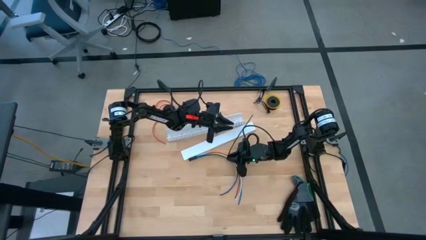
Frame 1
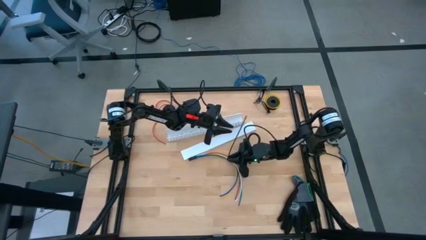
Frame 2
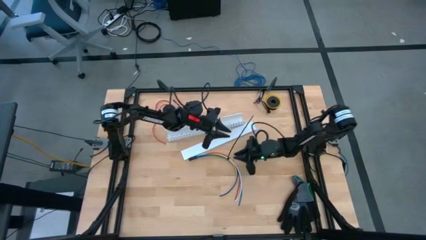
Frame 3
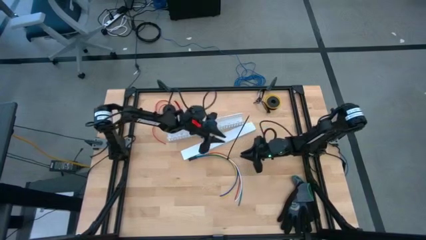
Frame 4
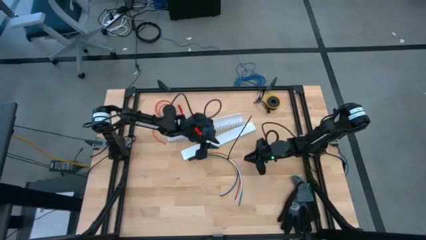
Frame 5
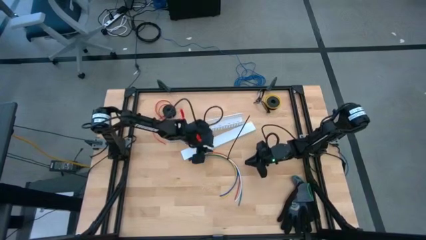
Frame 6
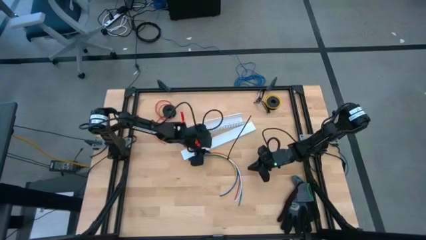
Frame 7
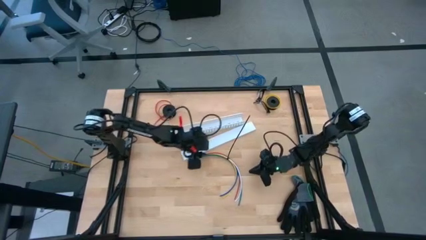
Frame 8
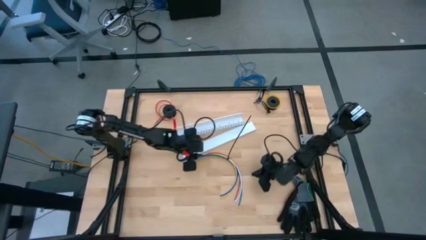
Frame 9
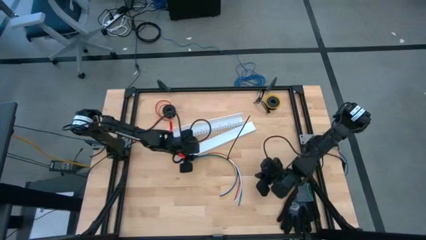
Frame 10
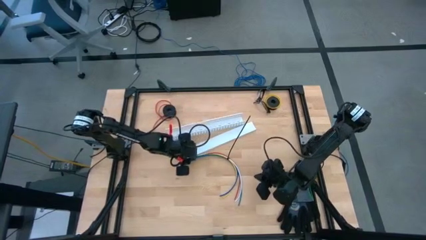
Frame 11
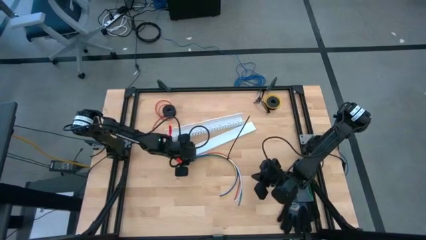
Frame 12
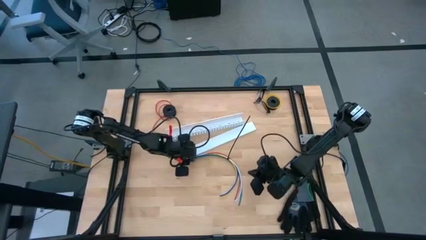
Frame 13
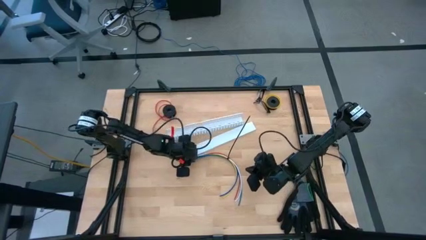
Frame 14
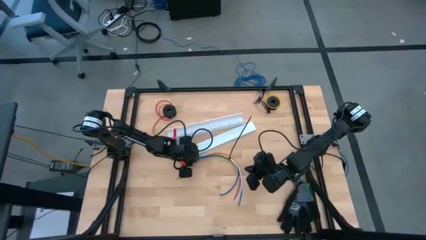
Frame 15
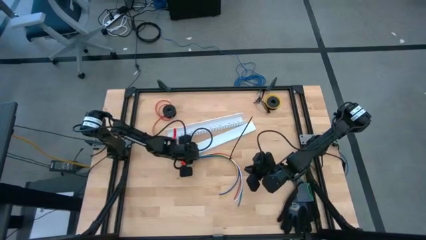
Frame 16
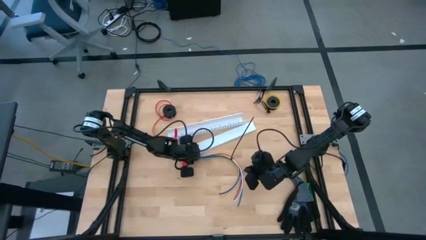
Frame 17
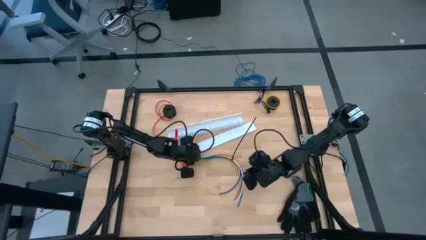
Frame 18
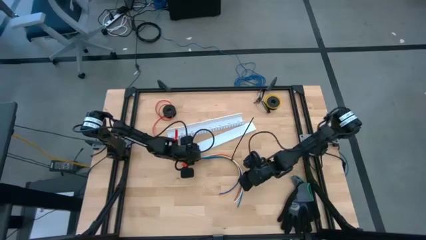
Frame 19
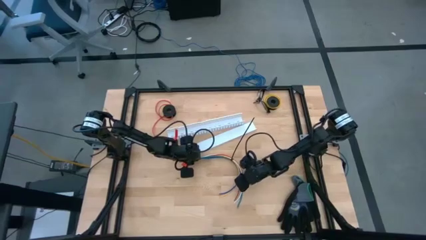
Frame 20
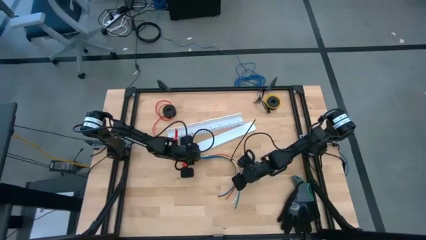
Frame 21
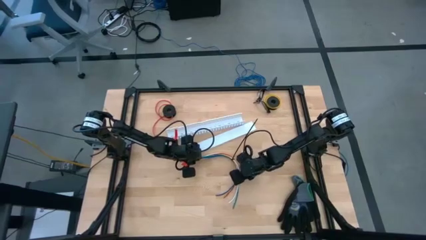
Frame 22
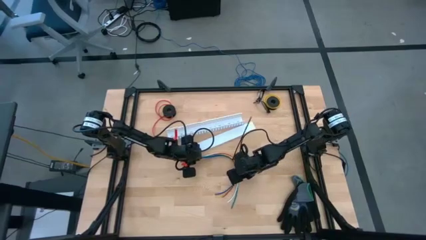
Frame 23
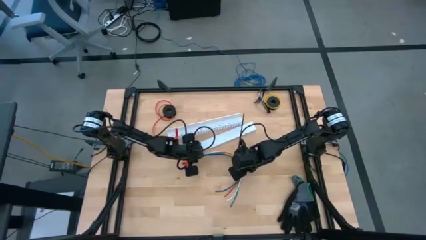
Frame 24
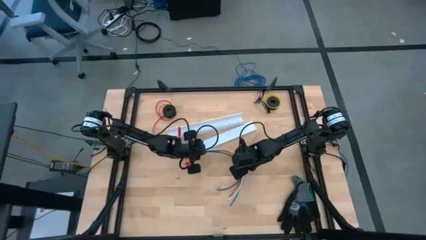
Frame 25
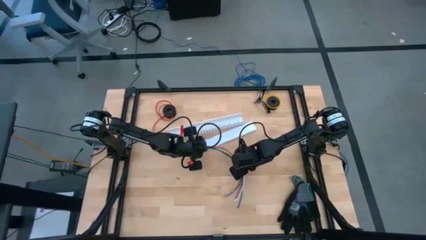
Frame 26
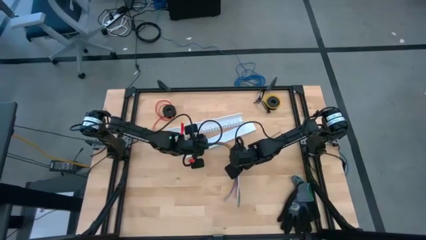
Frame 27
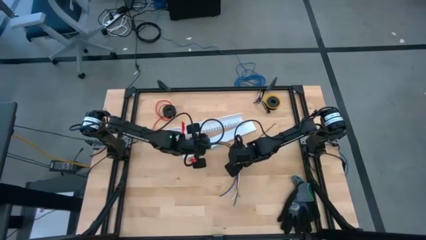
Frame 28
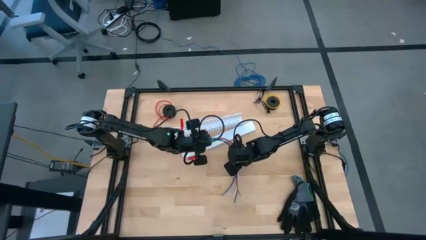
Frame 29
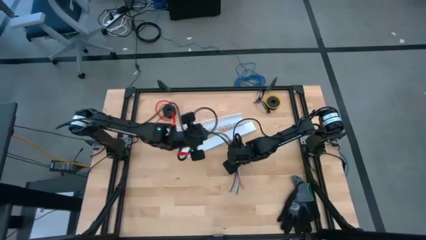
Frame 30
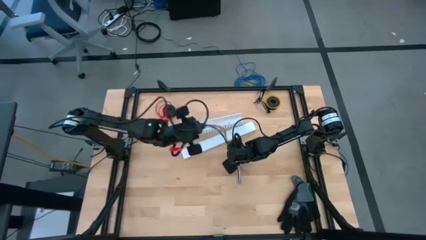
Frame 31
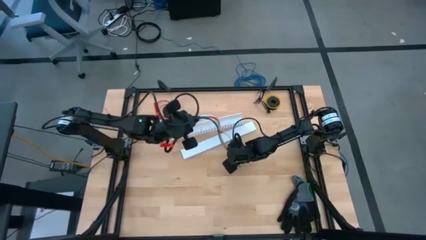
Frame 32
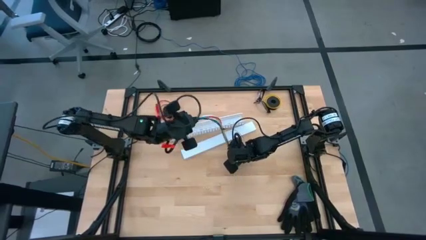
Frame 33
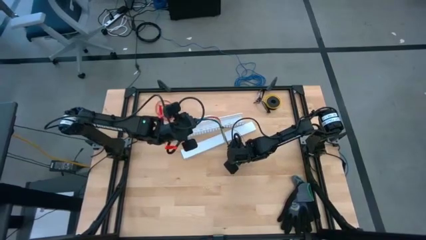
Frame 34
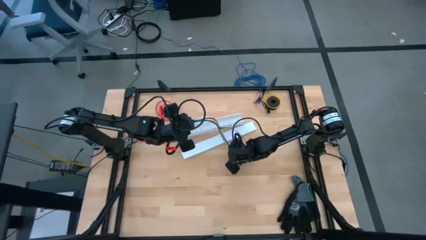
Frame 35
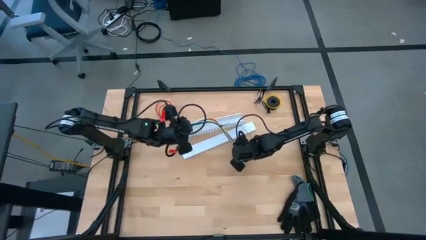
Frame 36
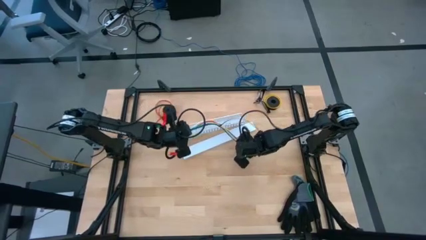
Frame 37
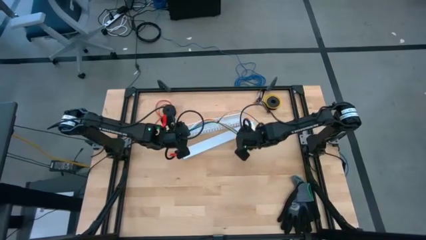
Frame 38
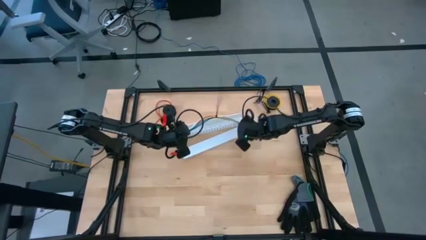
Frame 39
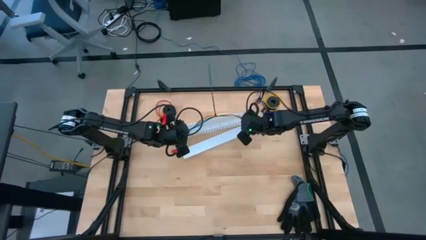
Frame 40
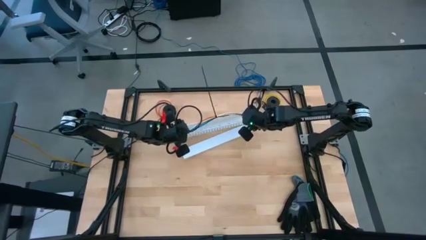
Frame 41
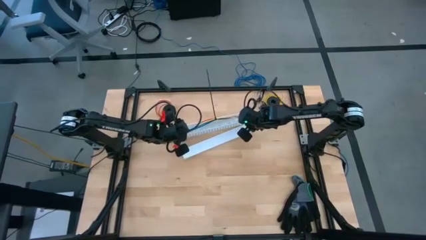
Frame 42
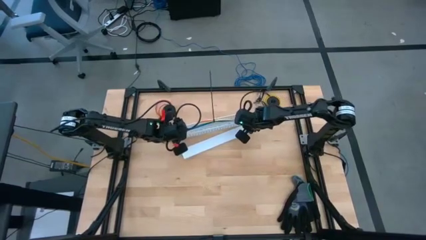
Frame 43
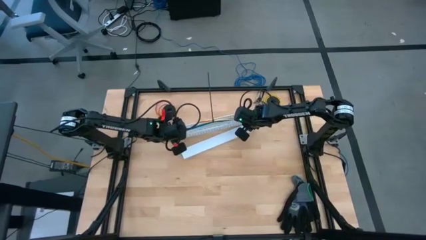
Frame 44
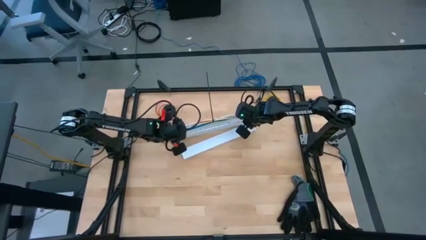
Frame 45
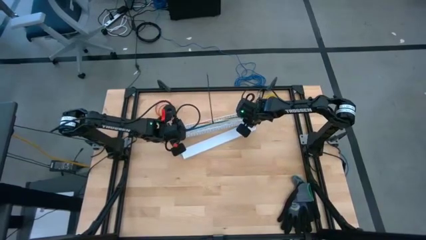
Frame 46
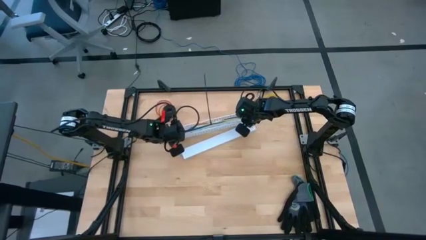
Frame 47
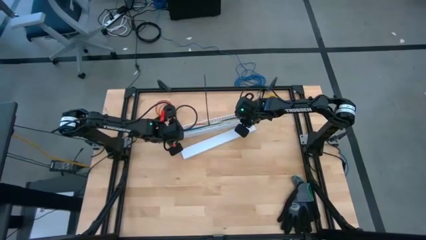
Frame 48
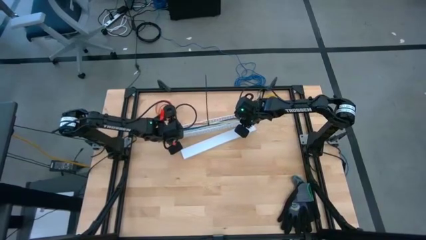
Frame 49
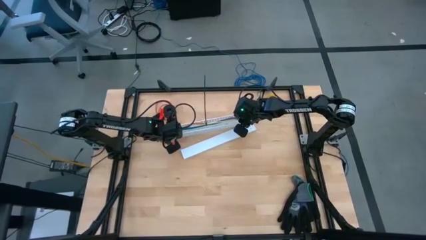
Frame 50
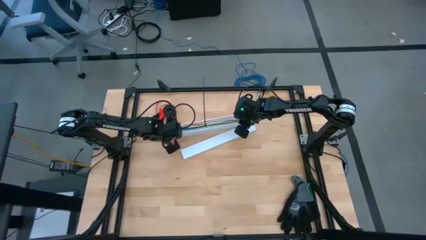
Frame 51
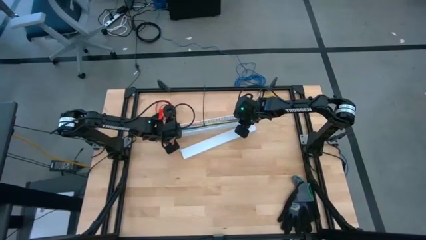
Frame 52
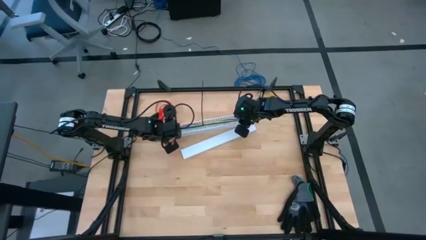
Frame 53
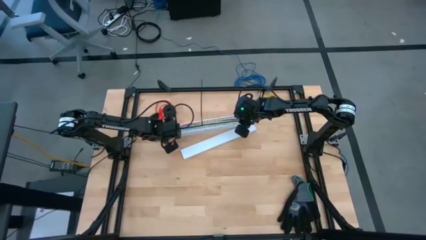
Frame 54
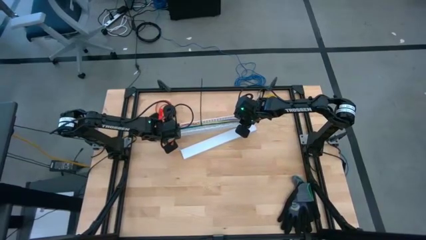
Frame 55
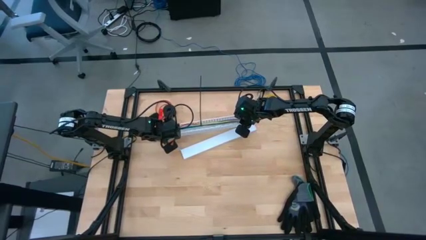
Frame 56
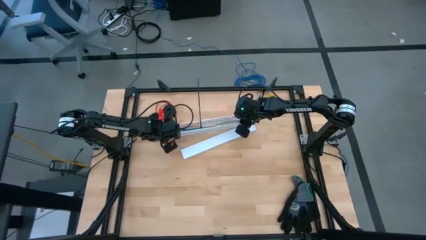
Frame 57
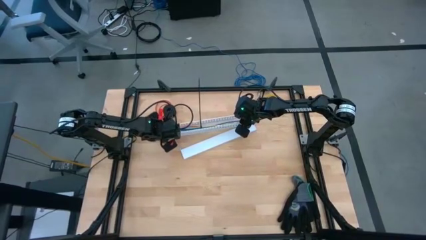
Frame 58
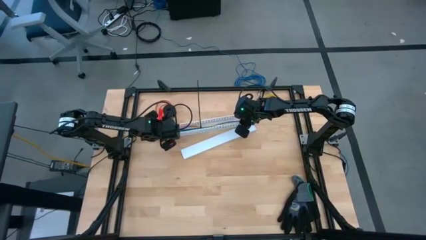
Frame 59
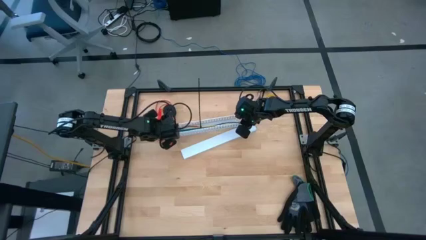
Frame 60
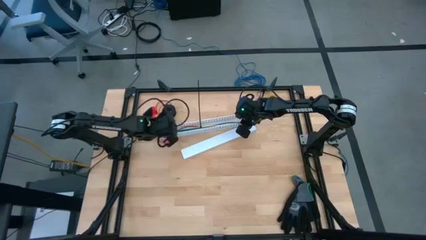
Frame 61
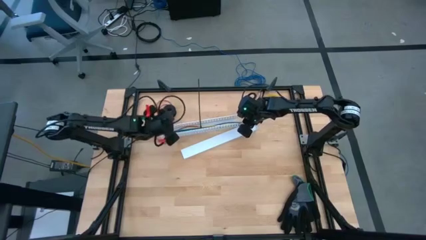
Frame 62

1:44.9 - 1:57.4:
Task: Ziptie cables
Put the zip tied cables into the white cable duct

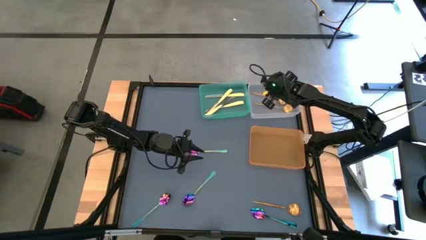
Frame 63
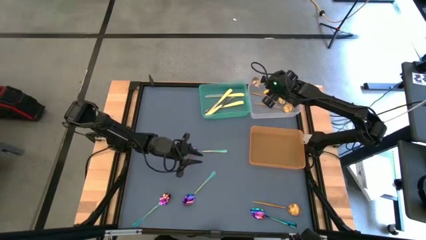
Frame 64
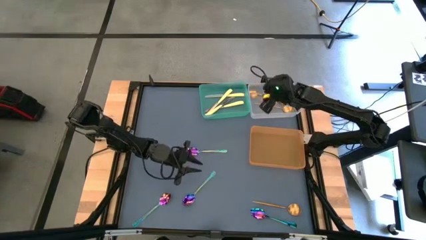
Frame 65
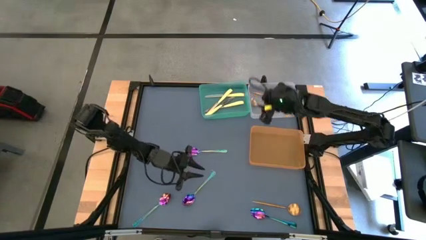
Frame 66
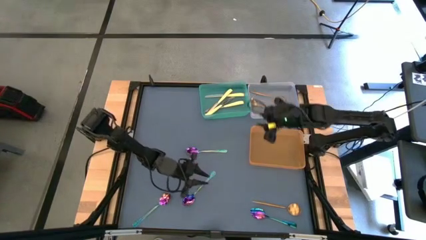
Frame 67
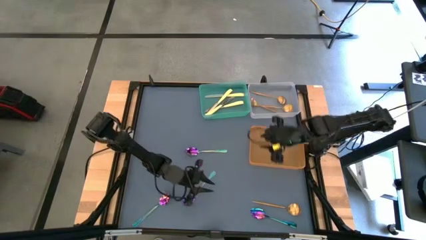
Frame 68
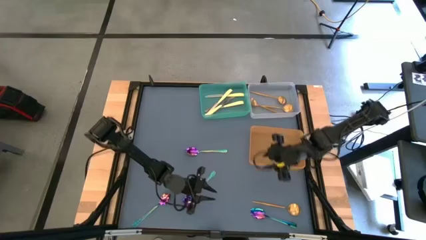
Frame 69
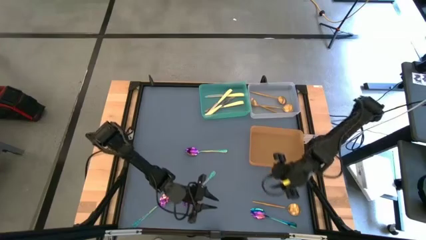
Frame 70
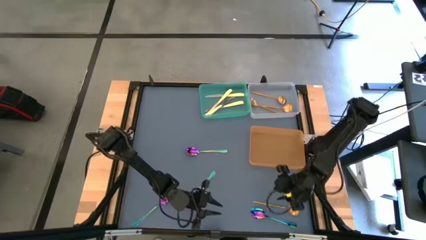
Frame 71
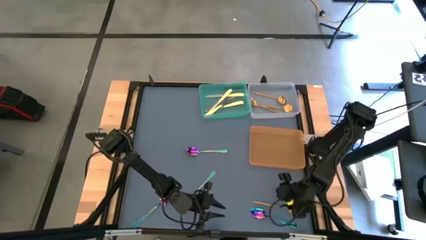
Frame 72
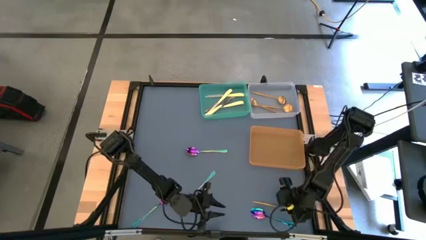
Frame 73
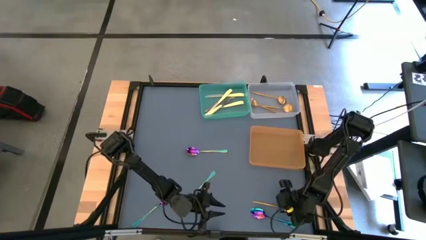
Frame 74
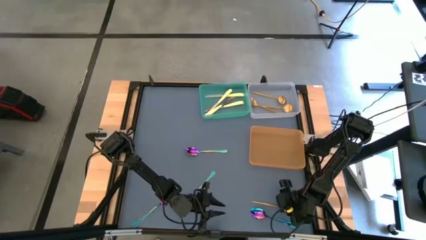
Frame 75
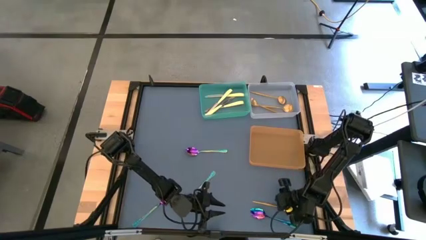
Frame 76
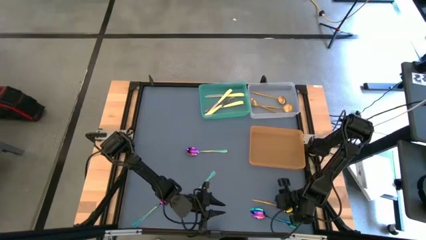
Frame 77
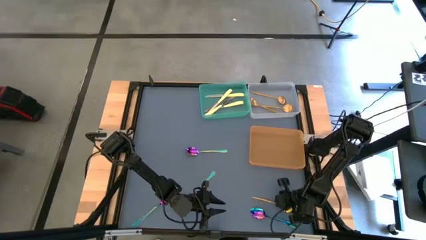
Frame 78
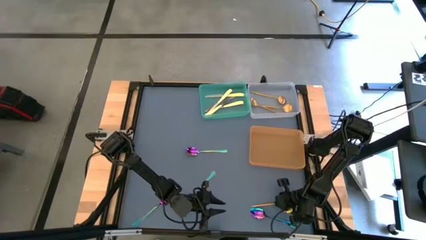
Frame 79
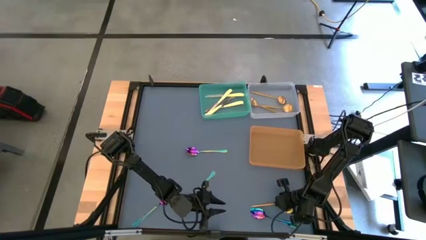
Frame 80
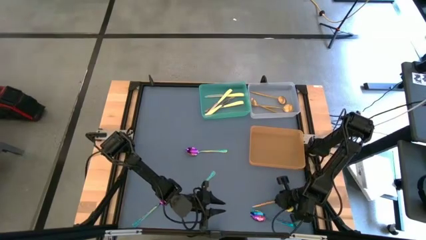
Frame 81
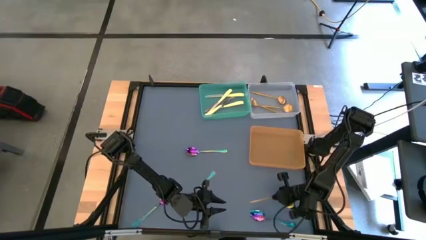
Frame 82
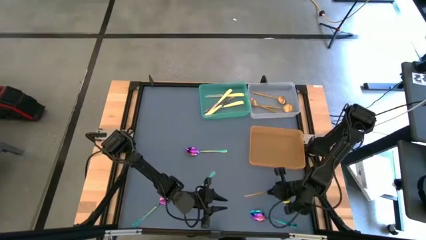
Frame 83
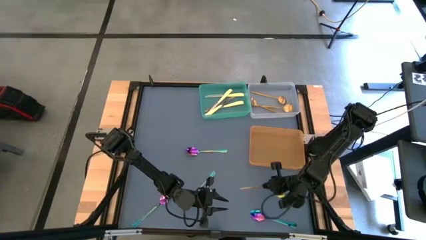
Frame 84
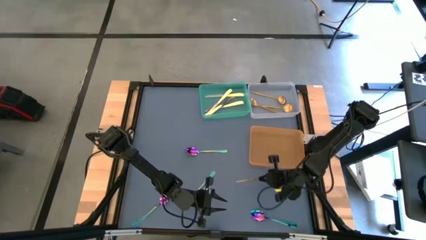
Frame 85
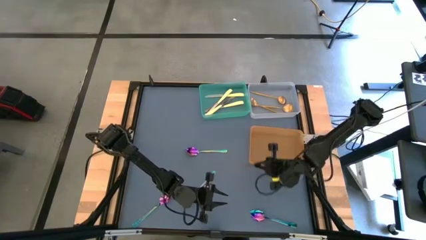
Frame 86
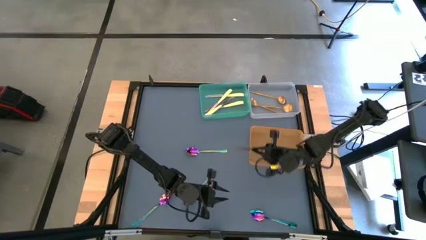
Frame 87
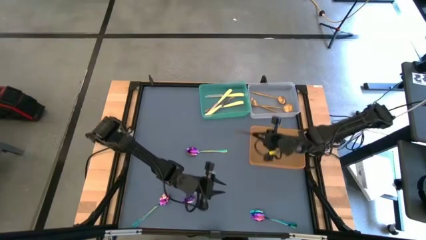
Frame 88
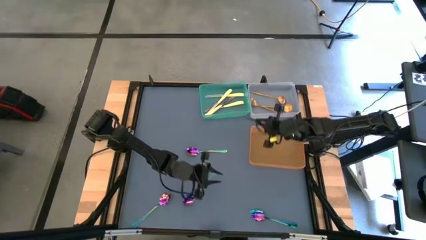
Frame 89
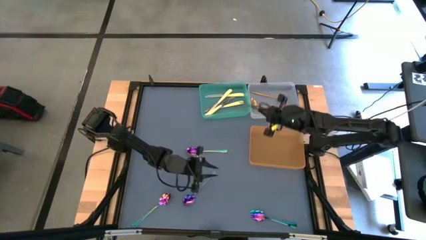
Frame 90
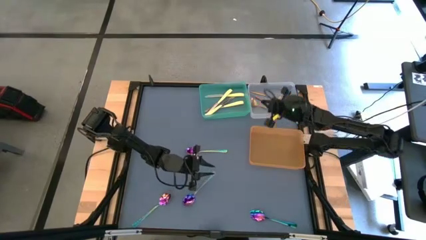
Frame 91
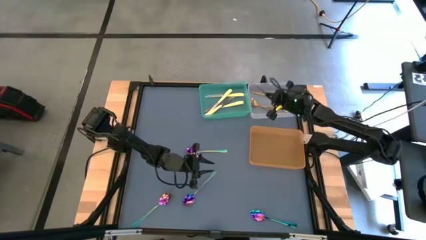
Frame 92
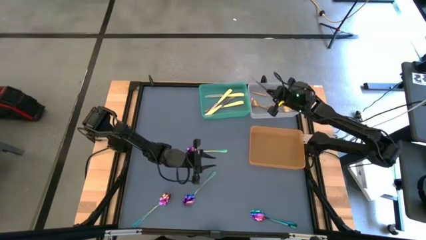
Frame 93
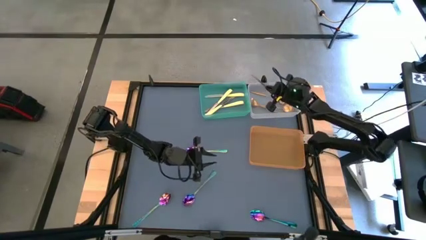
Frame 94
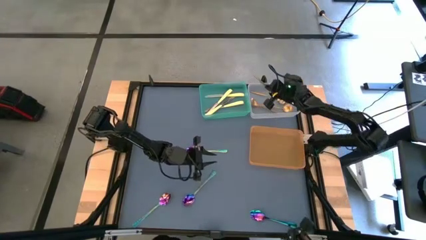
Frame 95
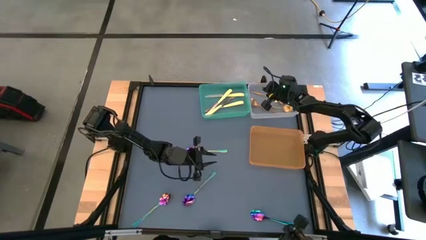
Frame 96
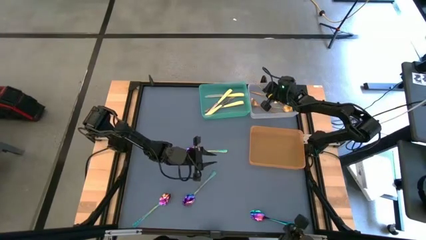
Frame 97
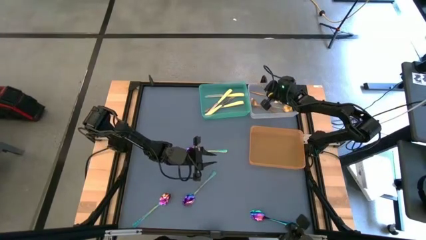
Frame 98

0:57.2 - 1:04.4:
Task: Sort silverware by color (type)
Put the gold spoon into the transparent bin
